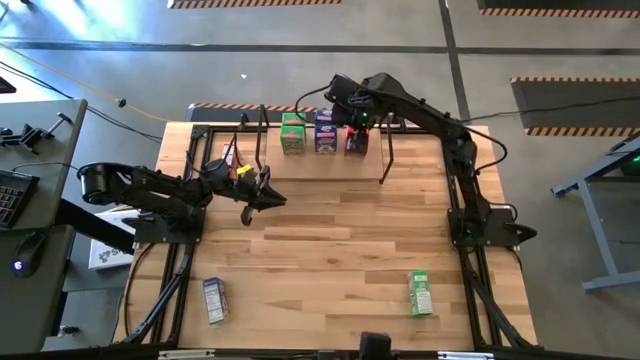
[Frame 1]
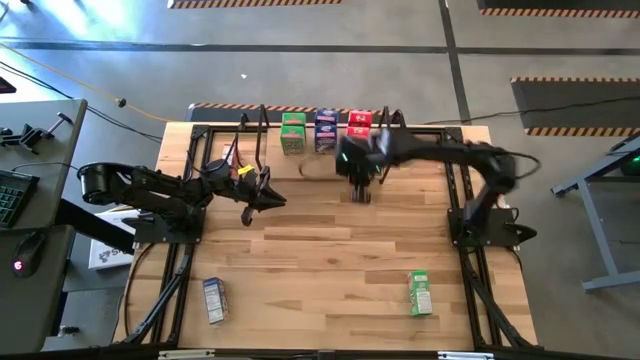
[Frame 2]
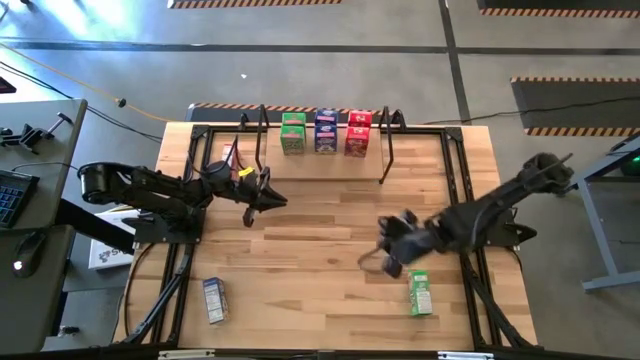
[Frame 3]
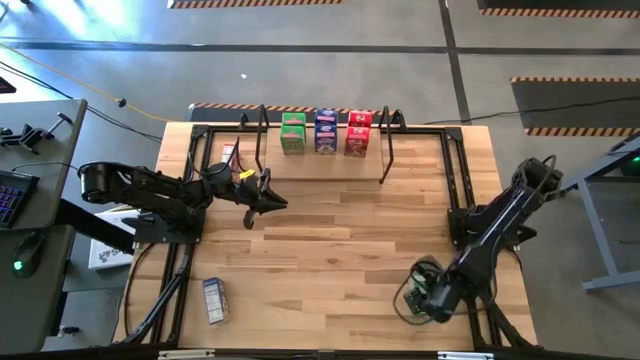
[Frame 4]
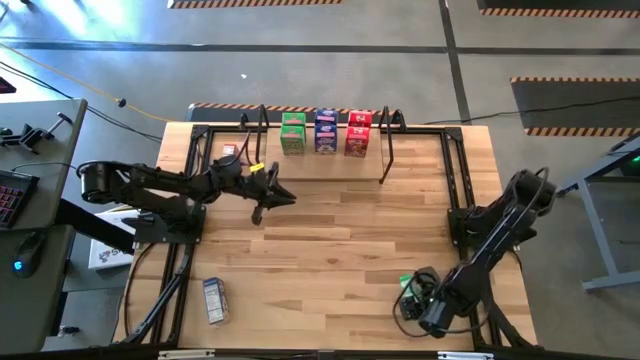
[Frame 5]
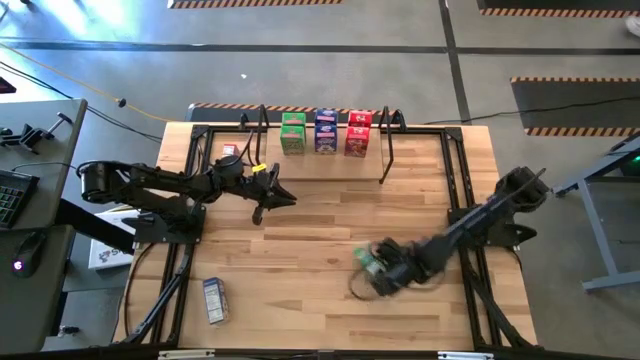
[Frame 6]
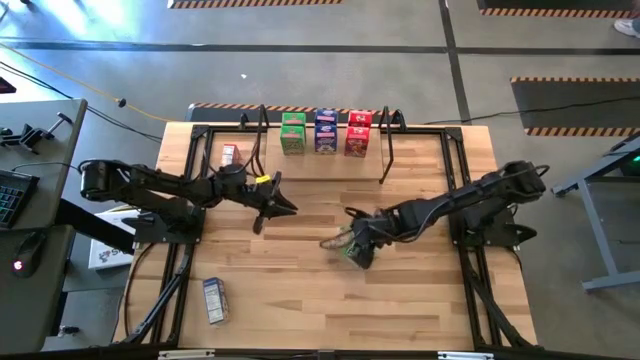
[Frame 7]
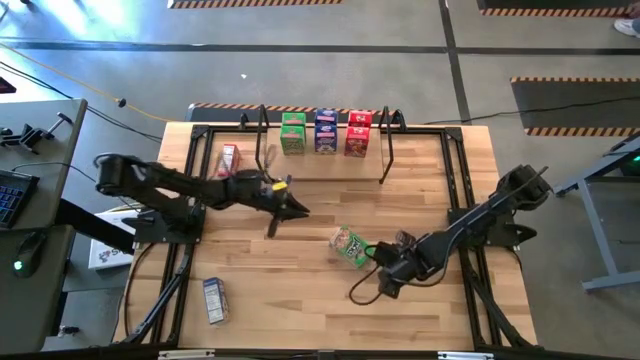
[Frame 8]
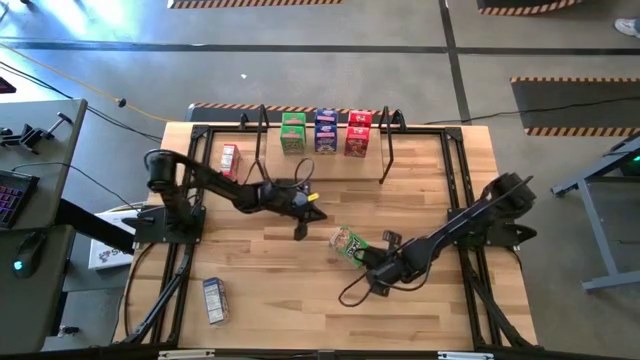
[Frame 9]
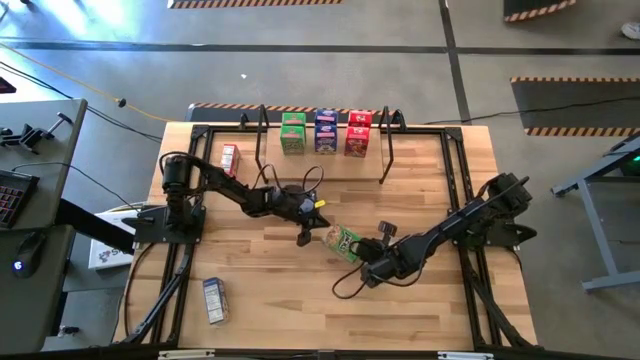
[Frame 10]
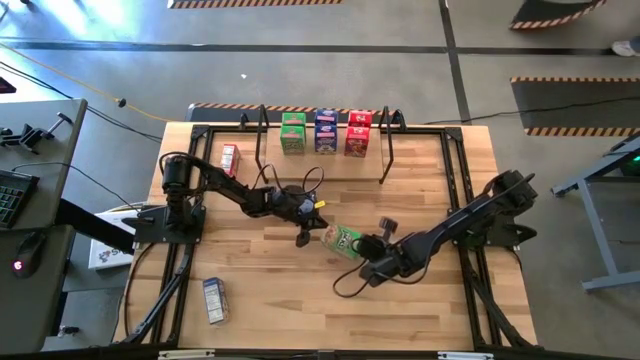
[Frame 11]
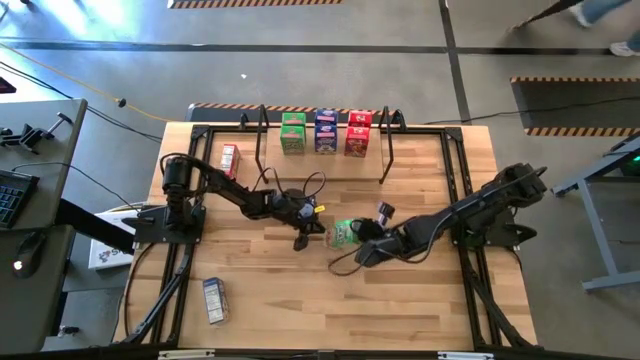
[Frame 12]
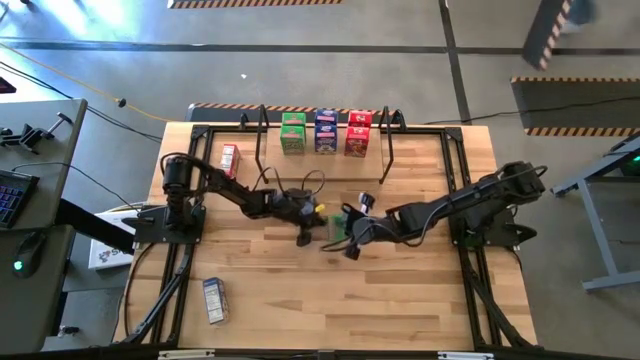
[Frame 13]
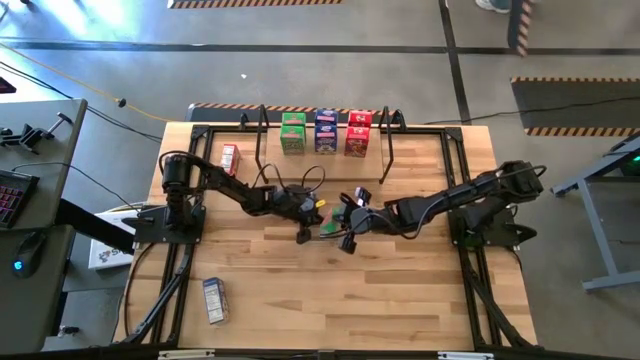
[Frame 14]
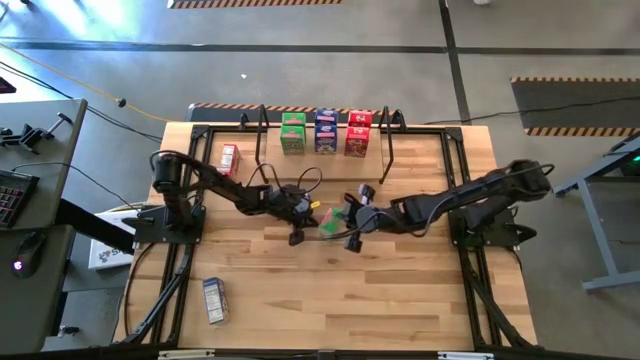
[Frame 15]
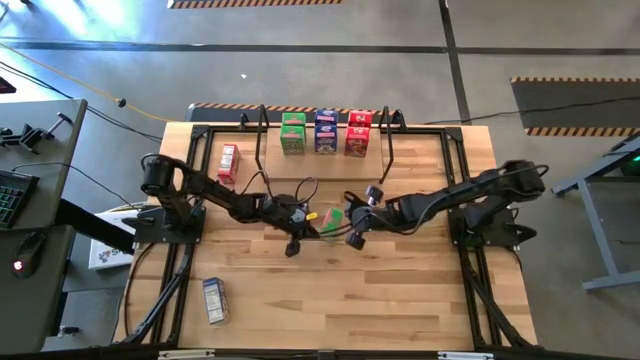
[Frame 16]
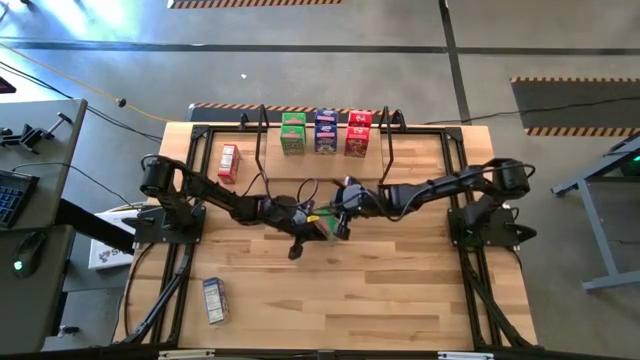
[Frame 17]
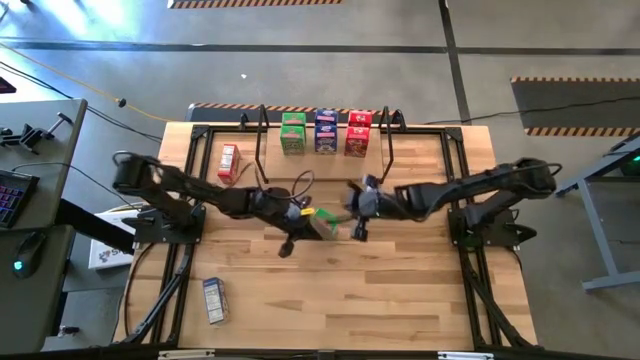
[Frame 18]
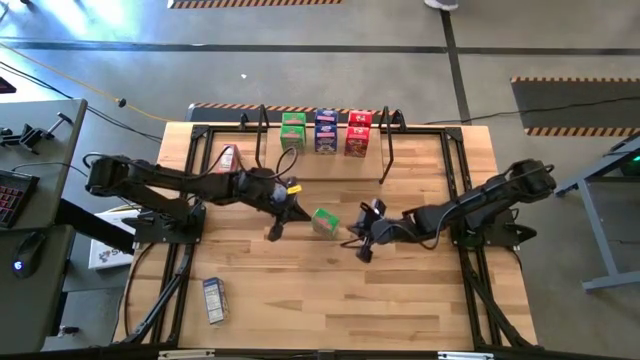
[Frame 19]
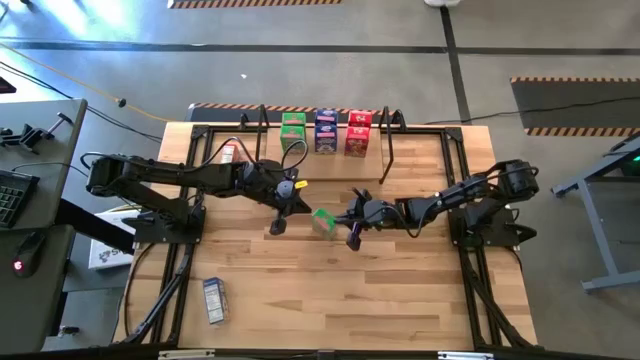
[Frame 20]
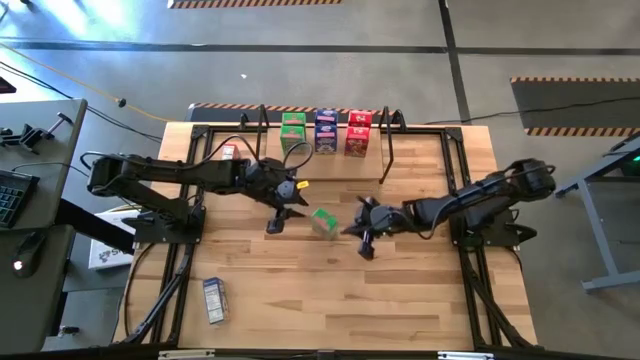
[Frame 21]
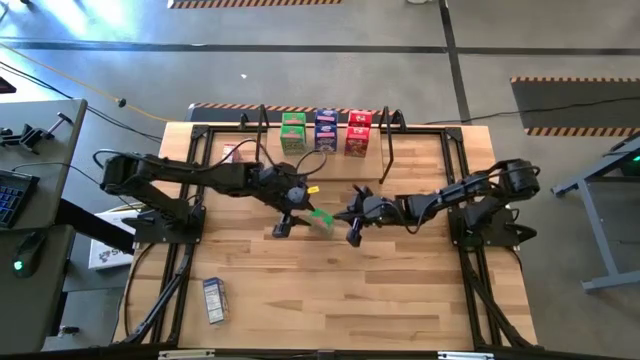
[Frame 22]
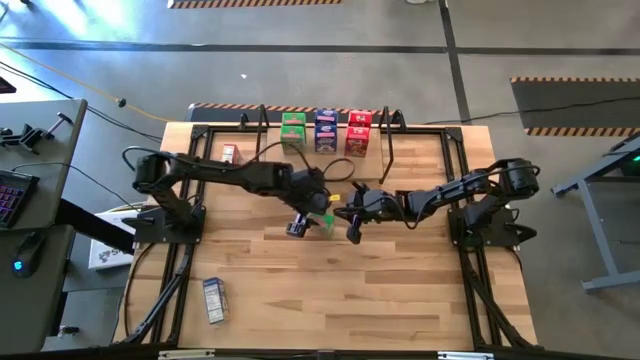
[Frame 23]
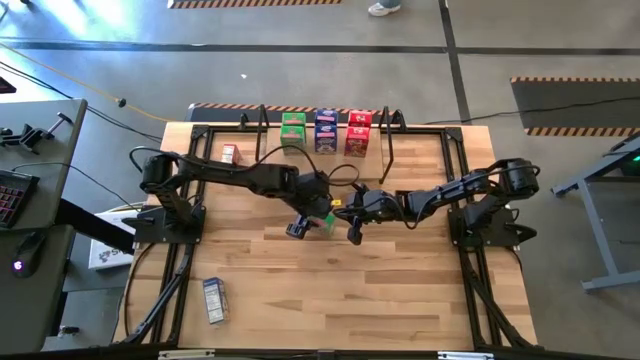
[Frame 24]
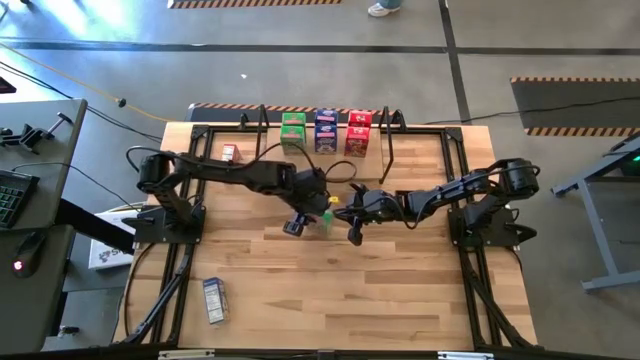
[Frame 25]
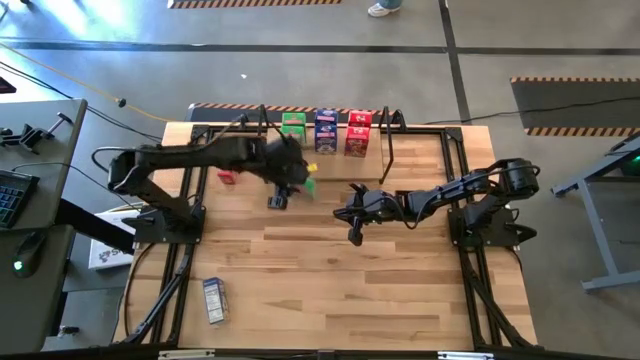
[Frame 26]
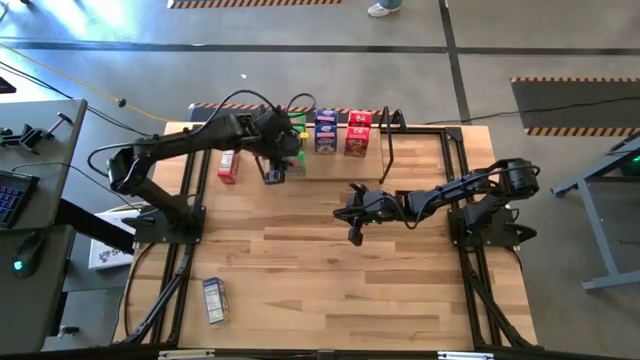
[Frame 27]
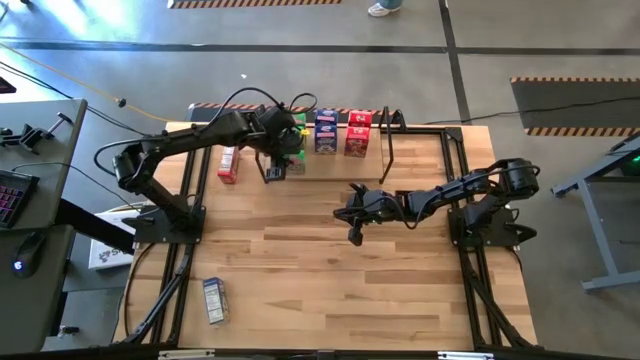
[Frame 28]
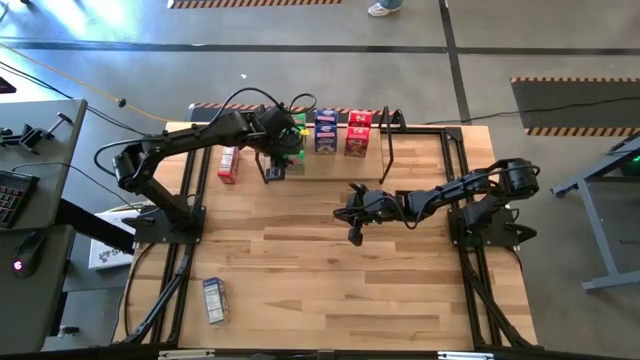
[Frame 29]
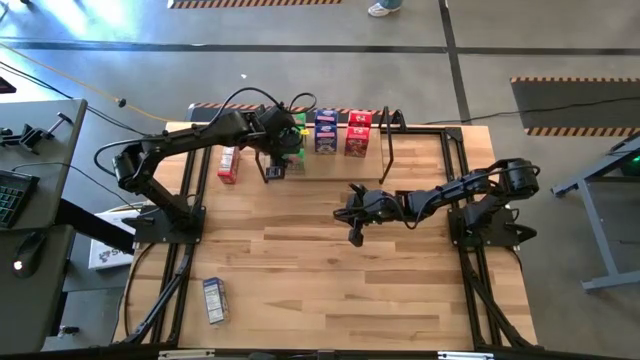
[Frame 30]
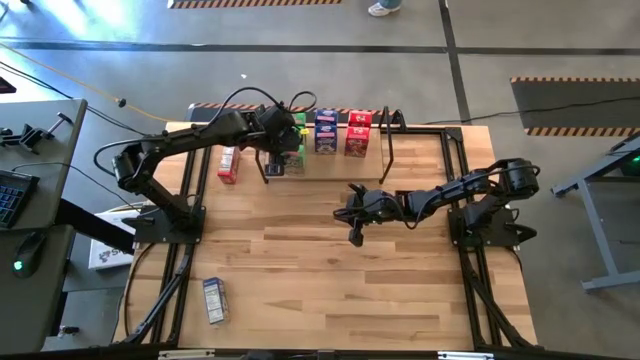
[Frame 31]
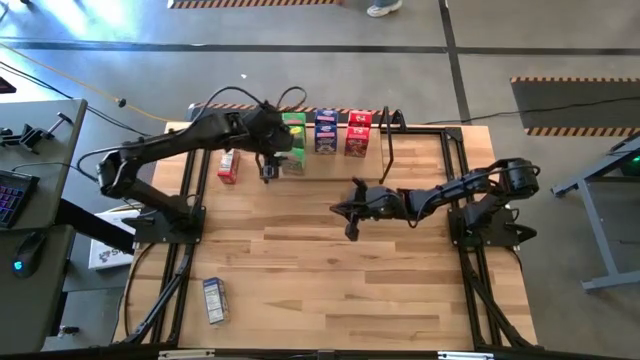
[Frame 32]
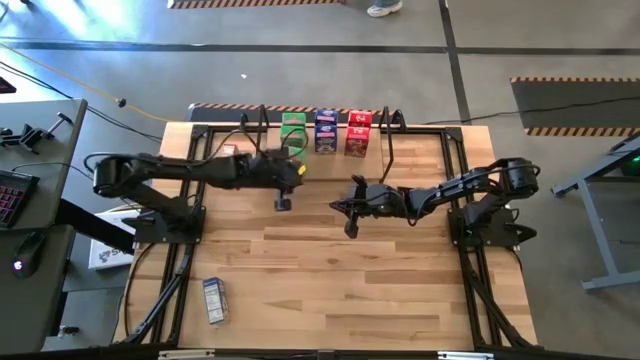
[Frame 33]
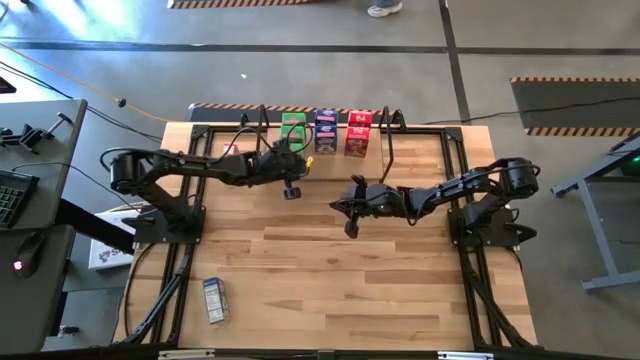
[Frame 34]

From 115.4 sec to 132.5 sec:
Task: Stack cereal on shelf
Put the green cereal box on the shelf aligned with the green cereal box

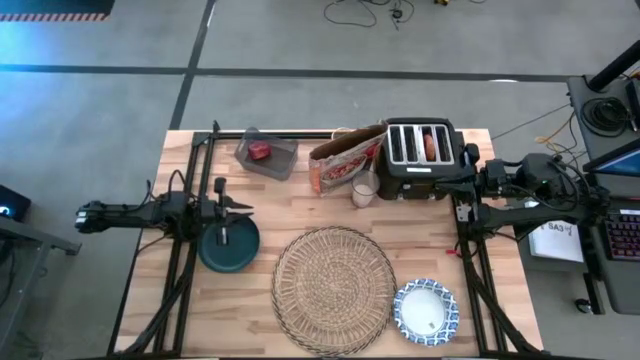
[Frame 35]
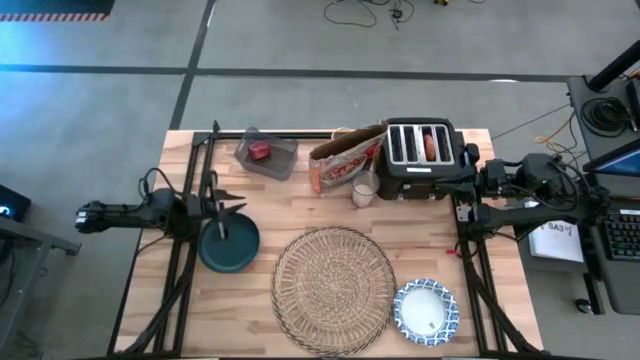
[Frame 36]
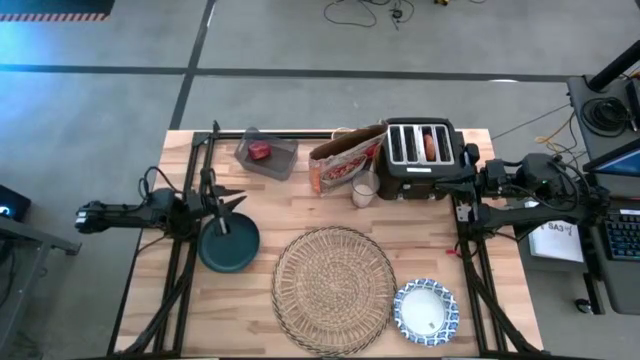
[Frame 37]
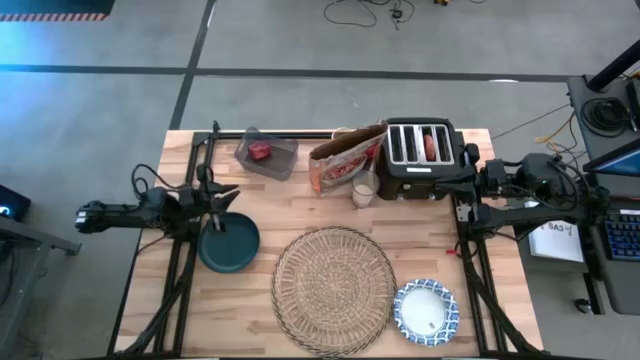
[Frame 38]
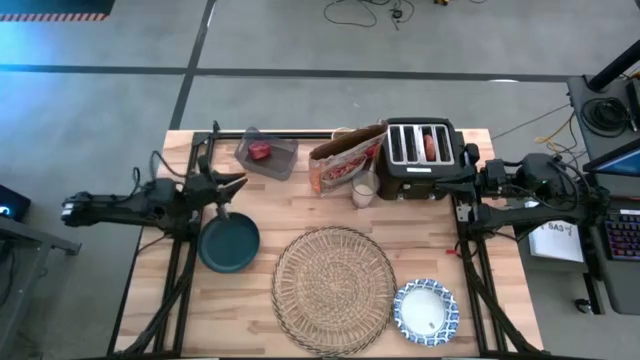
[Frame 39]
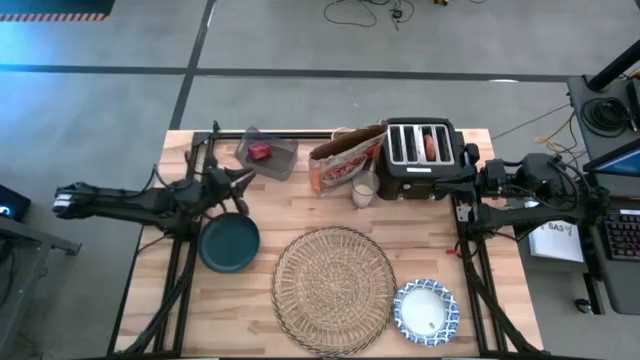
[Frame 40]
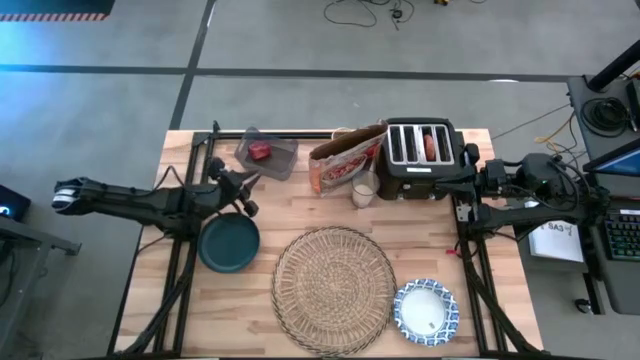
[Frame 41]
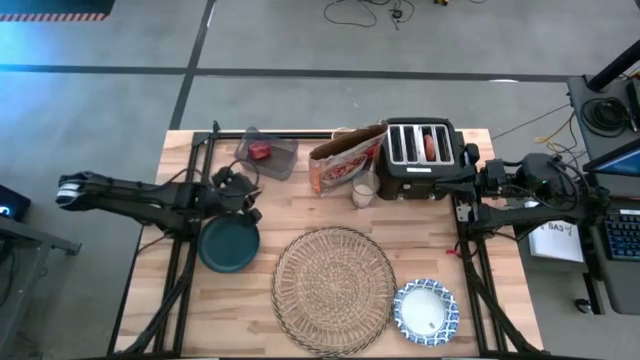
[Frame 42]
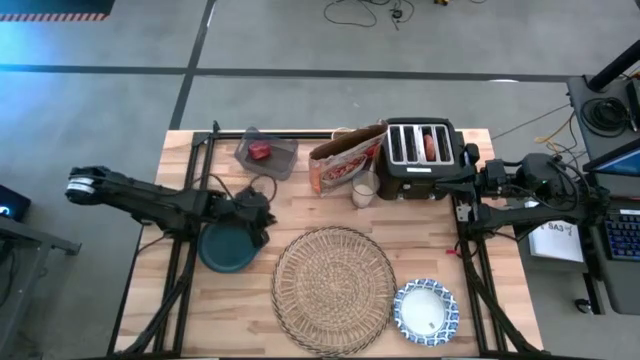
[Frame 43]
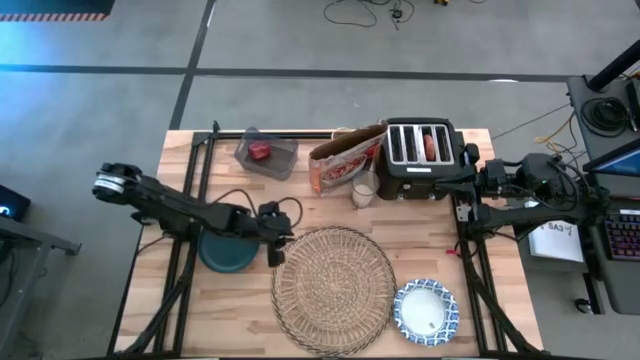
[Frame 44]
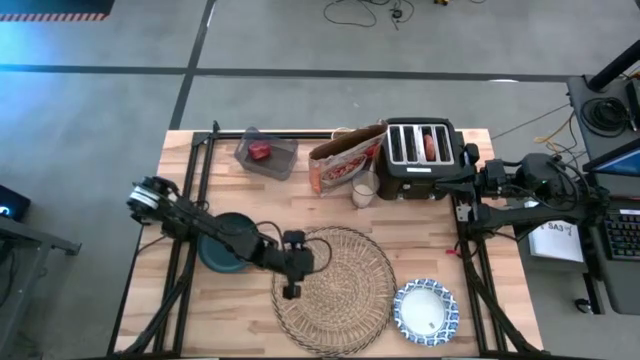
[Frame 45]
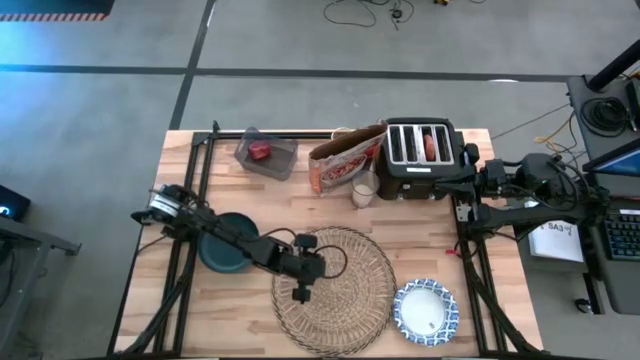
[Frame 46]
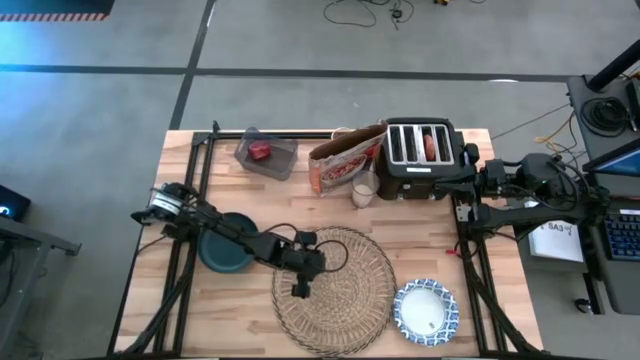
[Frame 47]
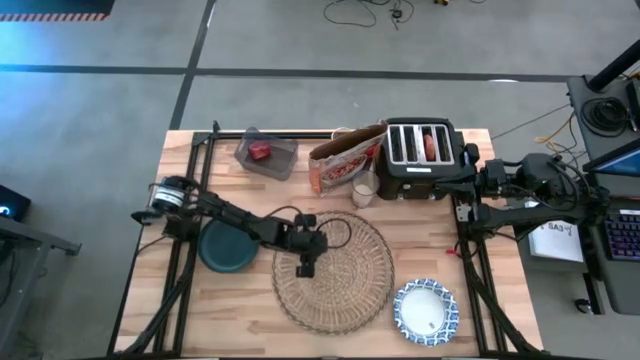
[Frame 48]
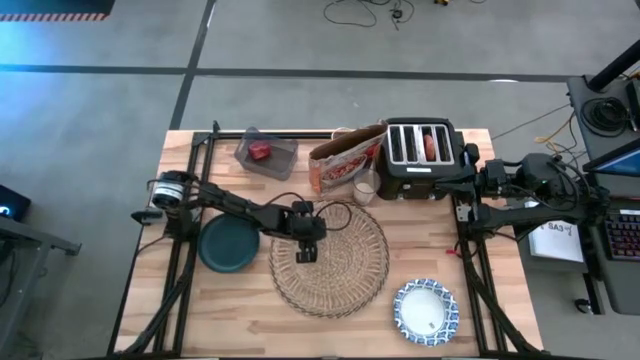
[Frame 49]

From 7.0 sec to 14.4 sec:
Task: Arrange a breakfast setting
Move the brown table mat to the center of the table
